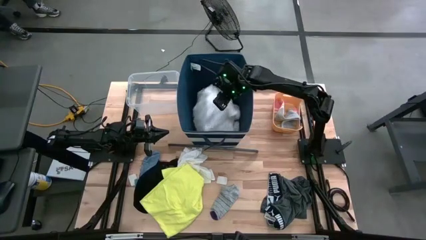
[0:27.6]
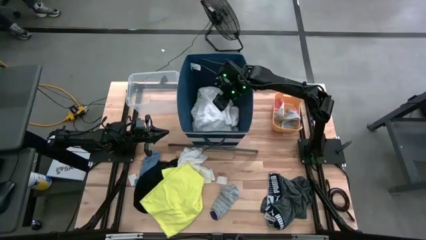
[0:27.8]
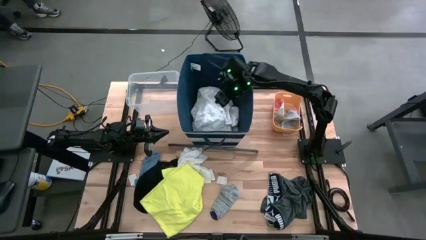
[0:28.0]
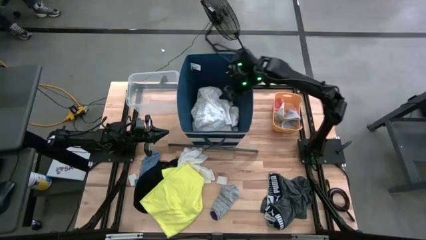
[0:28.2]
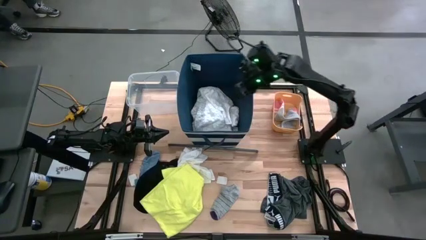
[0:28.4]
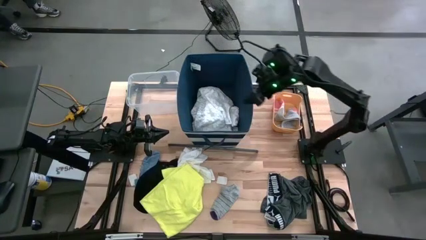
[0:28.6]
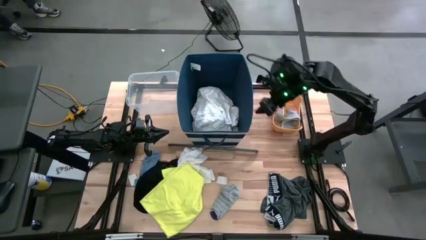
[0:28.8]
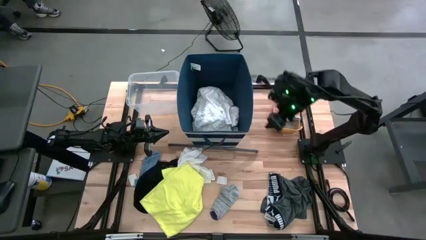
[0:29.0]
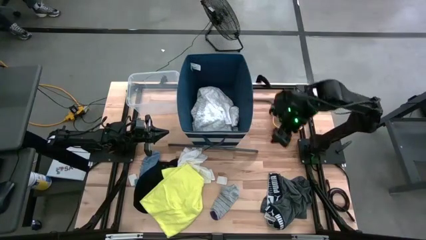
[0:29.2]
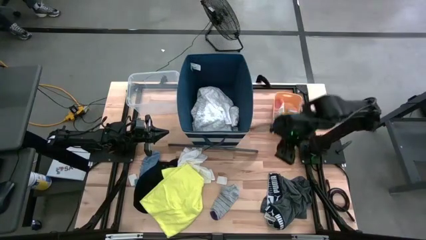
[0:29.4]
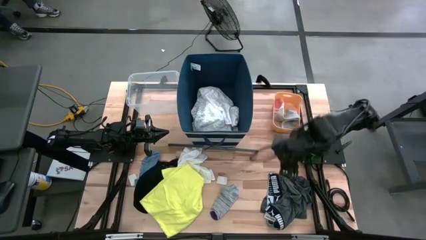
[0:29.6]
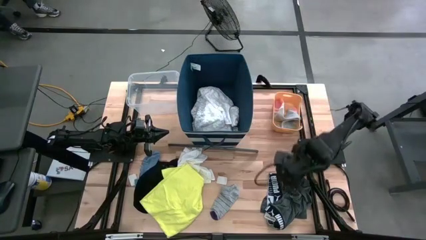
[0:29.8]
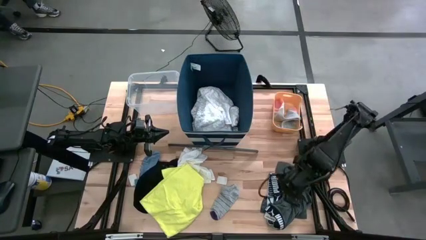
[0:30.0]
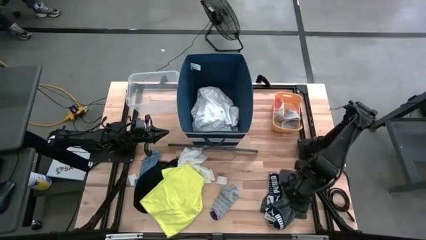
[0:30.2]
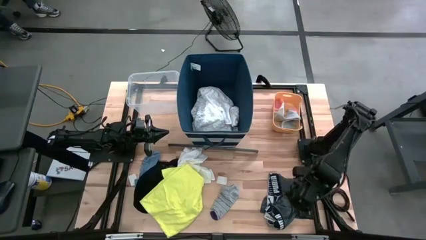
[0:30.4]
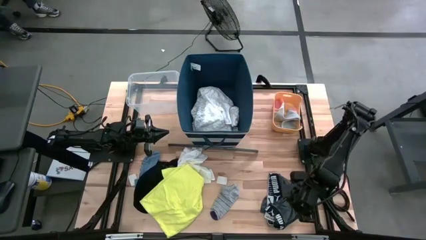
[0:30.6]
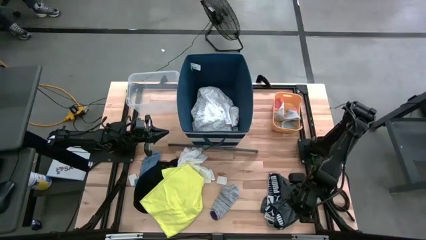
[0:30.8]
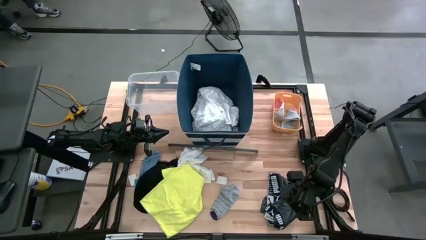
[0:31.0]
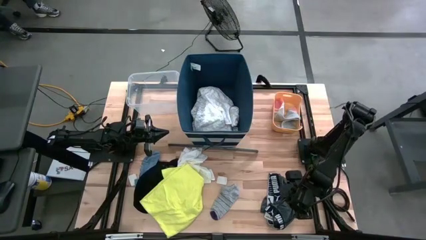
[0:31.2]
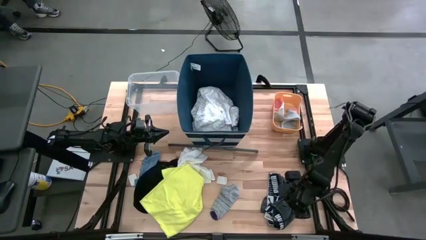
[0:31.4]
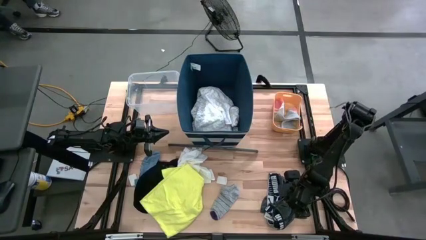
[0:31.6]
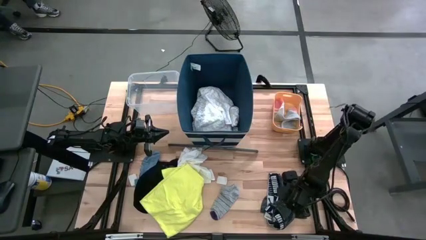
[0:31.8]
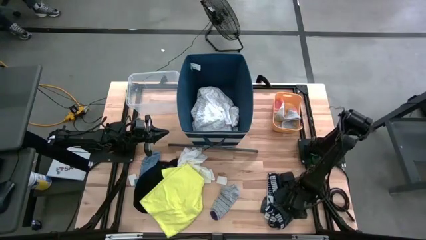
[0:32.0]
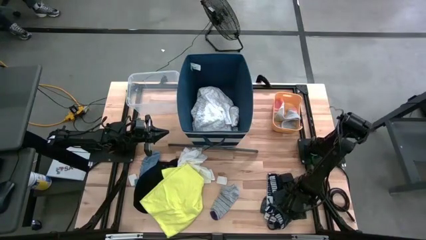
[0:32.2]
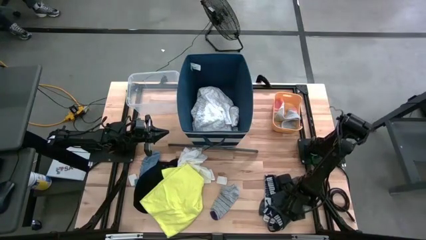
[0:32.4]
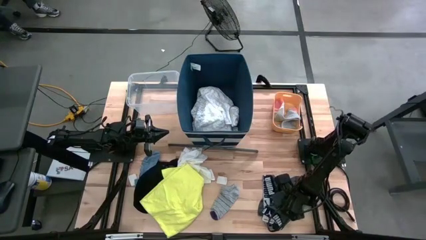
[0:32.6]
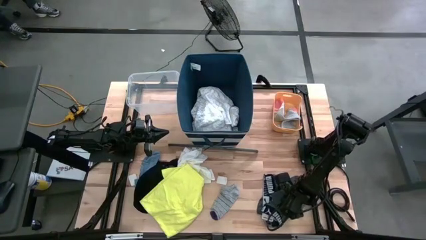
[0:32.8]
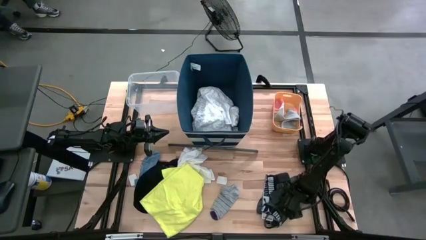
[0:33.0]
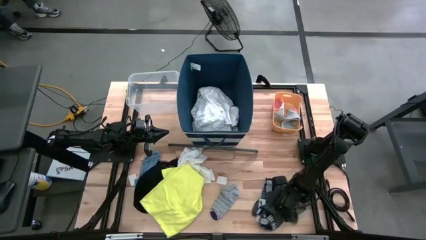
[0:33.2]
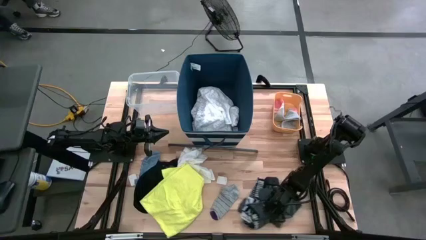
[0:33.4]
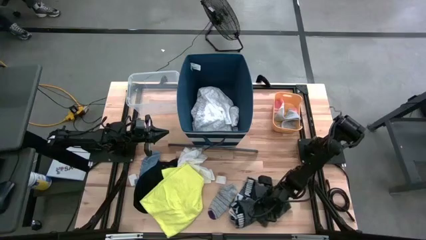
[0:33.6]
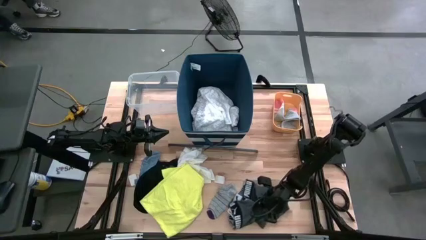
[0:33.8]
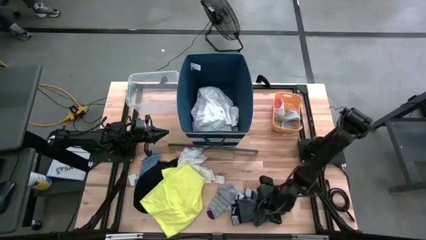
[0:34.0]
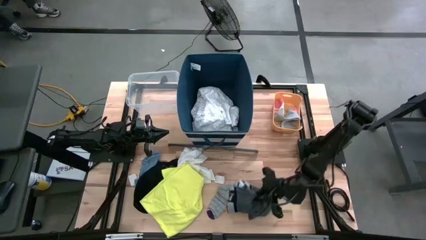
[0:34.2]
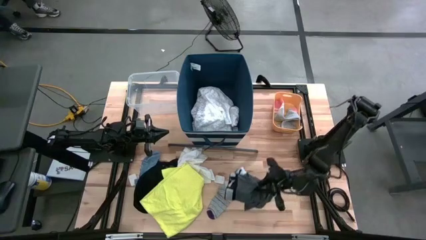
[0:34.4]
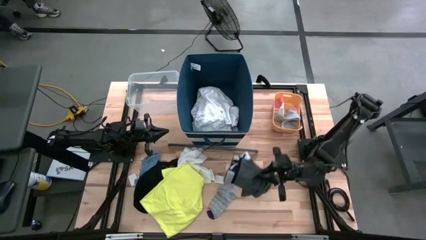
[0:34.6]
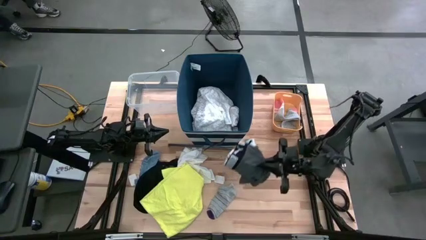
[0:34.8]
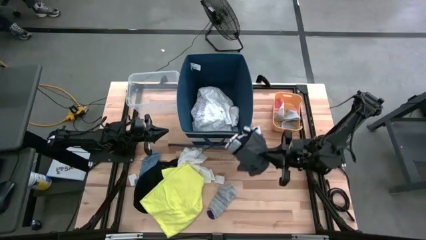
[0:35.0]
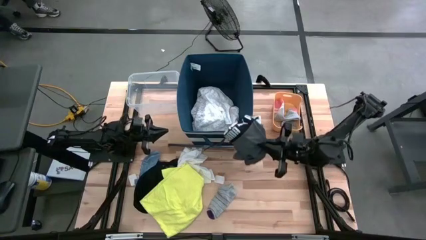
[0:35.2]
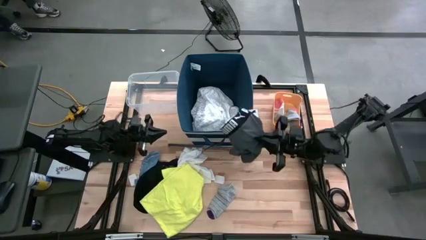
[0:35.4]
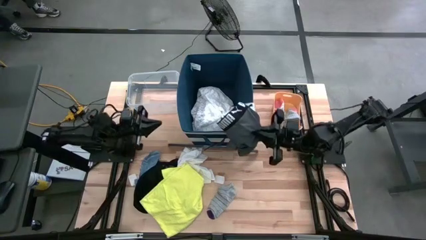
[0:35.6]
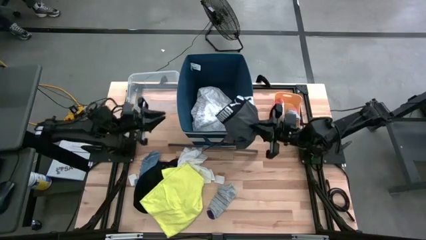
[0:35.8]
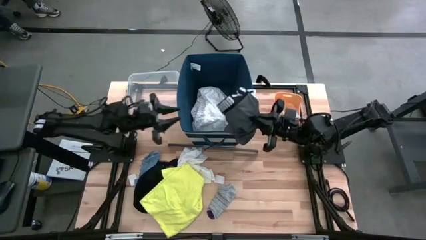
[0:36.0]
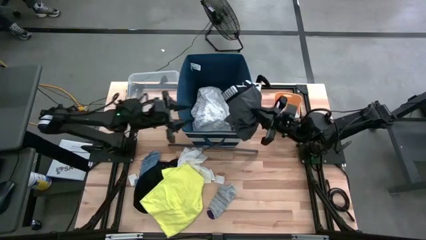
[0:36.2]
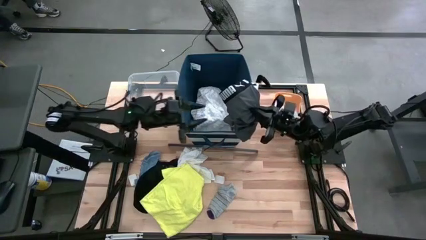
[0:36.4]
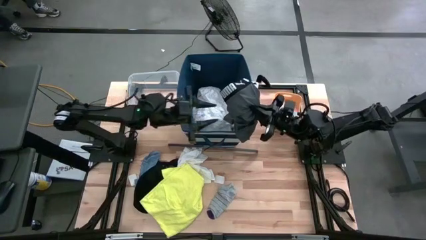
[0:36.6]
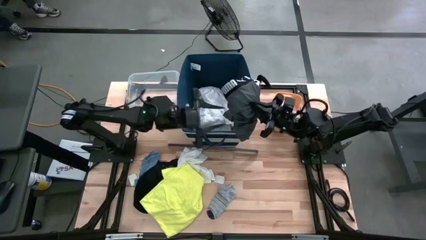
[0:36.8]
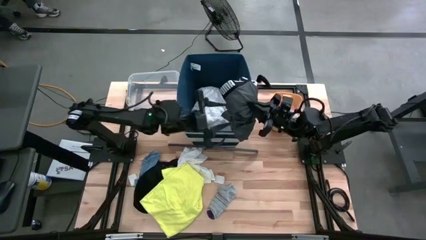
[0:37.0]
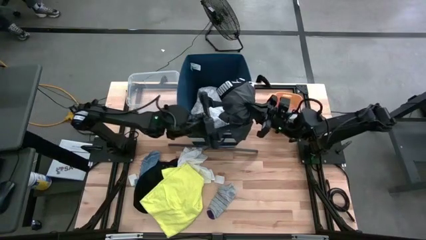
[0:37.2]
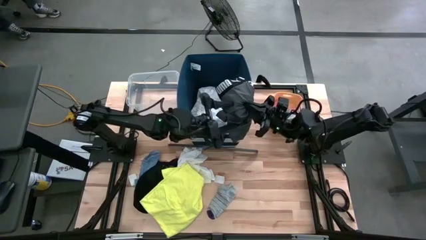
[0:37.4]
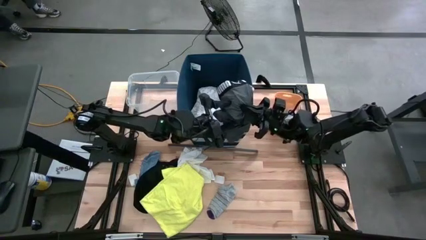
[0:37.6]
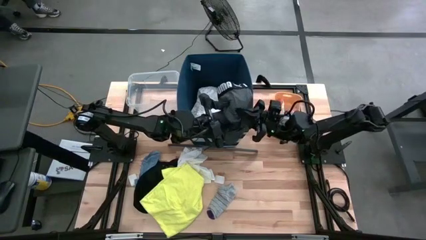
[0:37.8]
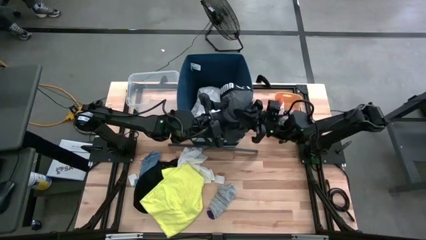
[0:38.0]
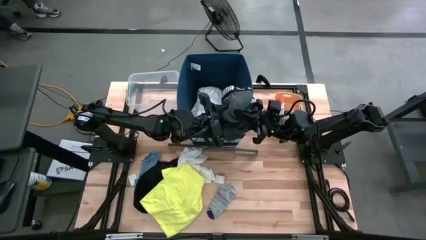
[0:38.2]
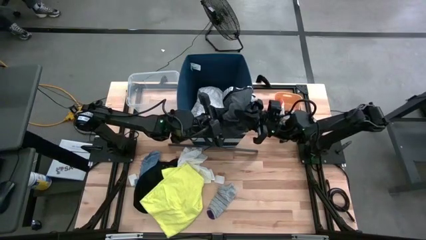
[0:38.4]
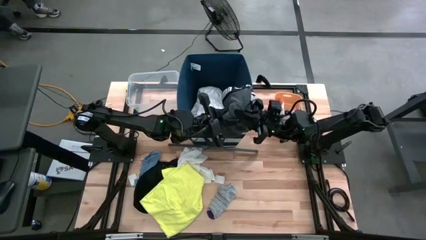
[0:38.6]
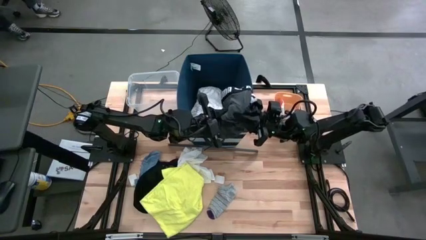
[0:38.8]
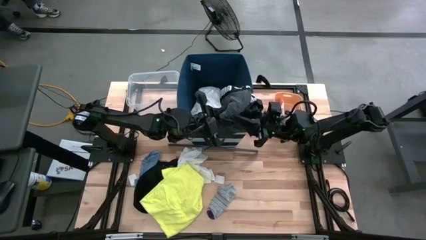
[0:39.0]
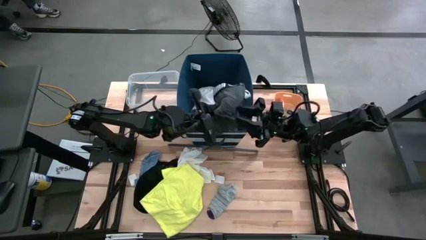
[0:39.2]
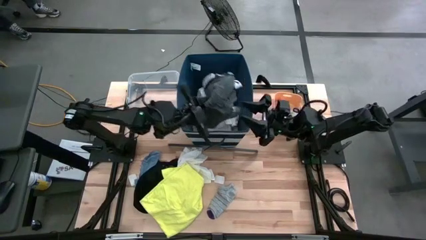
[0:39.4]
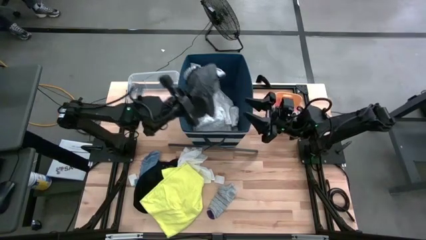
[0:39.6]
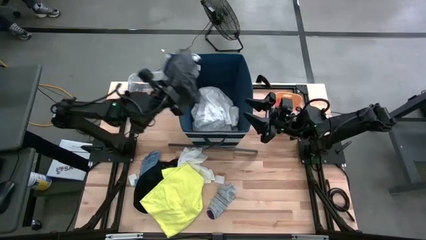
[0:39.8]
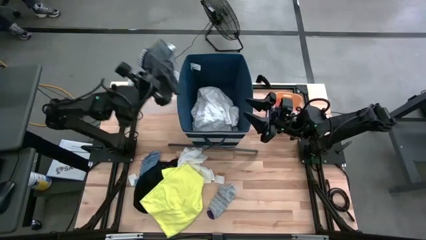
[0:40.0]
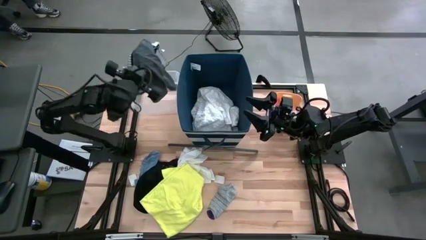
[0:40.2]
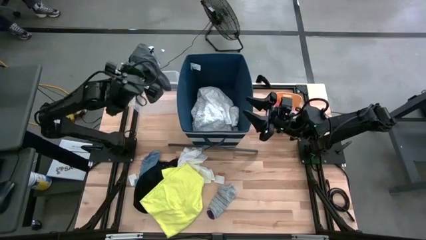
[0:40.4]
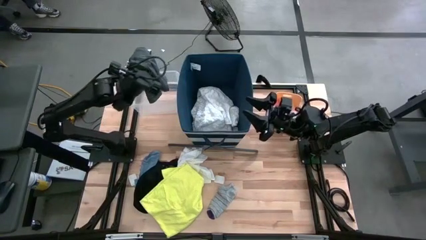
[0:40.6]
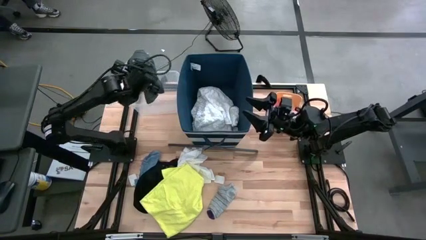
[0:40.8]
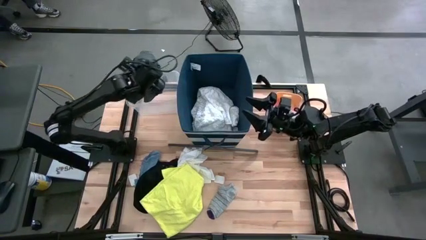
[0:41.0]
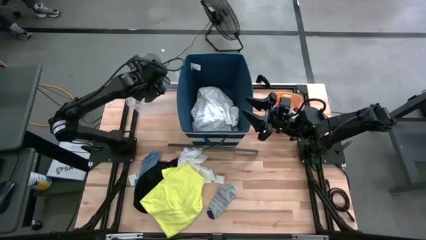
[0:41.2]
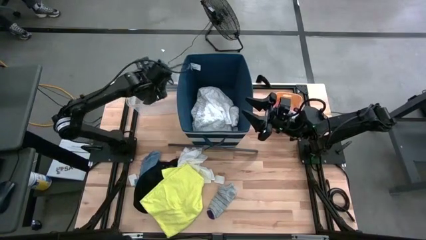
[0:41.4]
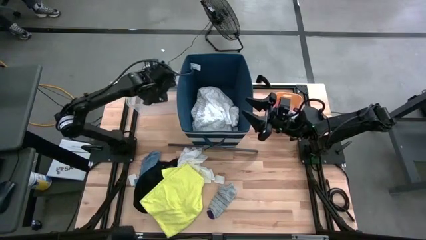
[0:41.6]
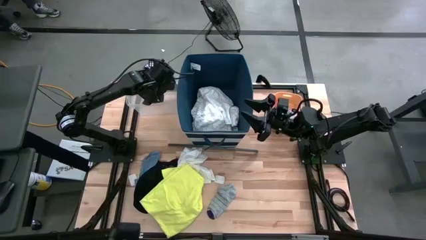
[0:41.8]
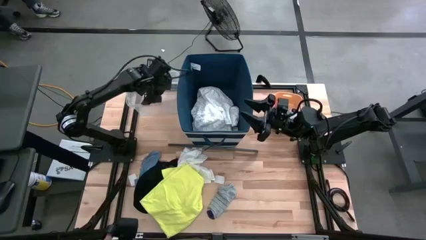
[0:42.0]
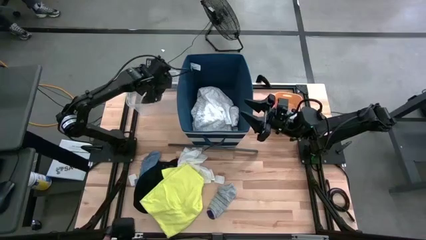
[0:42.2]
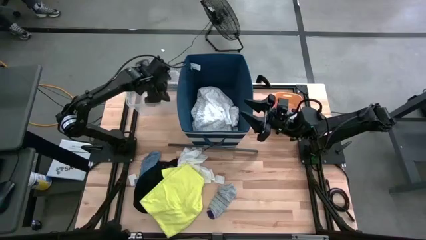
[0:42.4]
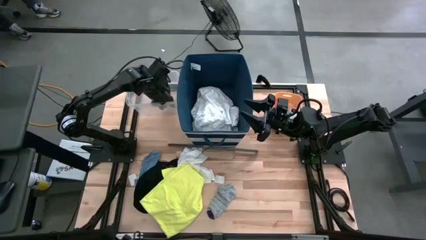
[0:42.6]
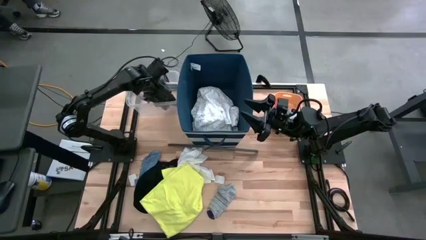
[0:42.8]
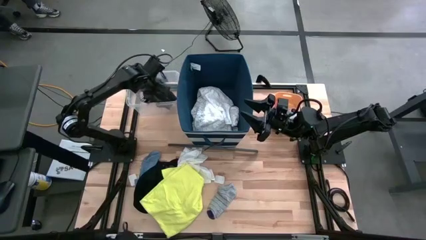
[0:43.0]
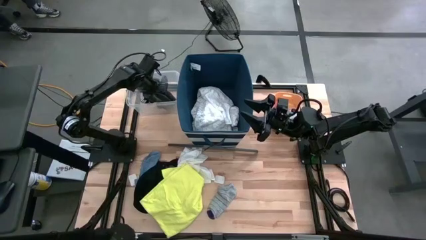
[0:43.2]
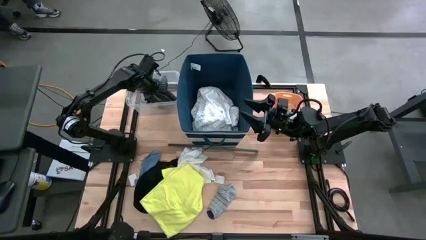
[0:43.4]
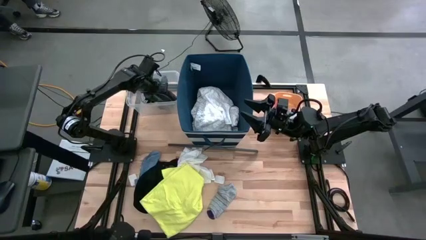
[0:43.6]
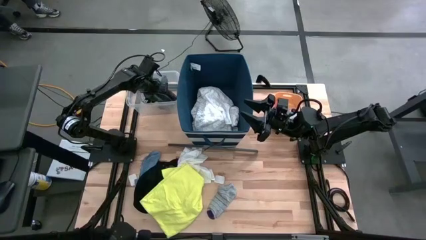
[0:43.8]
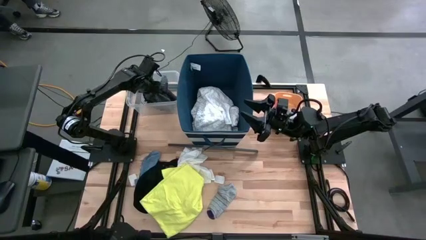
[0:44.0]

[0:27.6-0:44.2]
Task: Pick & Place Cloths
Put the grey boxer into the transparent container
